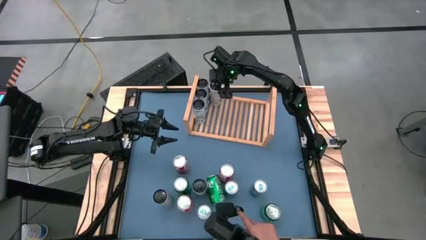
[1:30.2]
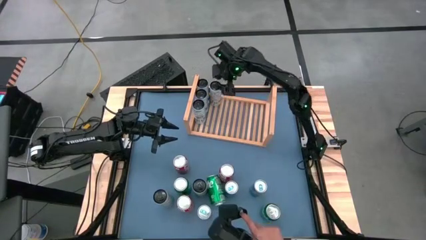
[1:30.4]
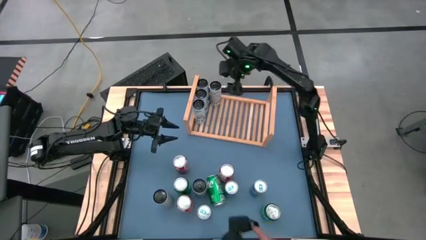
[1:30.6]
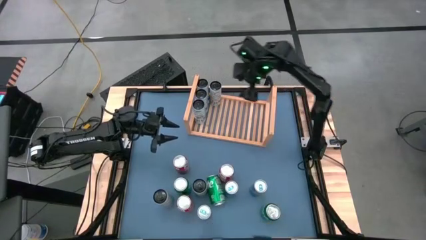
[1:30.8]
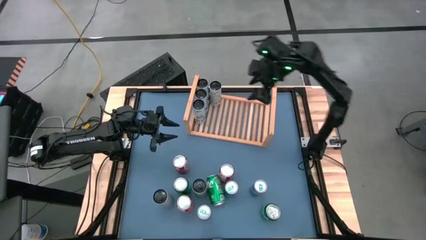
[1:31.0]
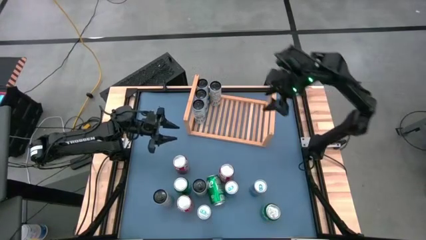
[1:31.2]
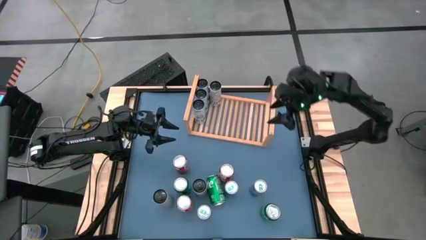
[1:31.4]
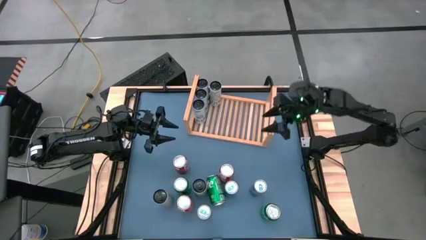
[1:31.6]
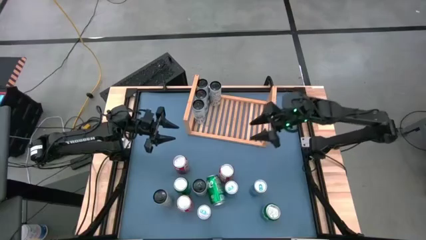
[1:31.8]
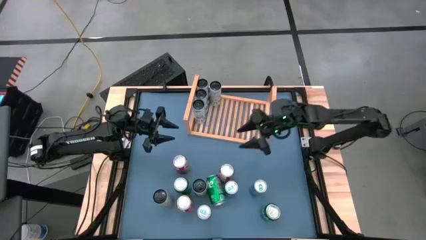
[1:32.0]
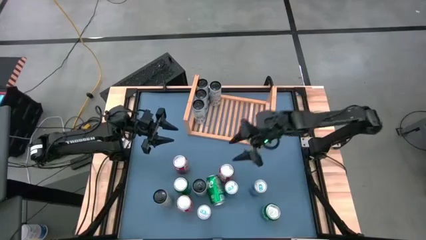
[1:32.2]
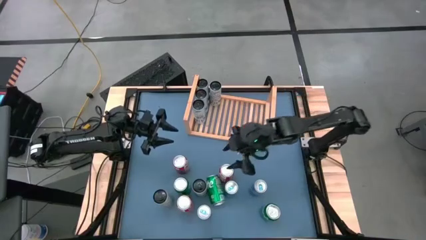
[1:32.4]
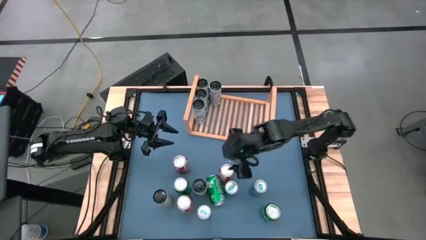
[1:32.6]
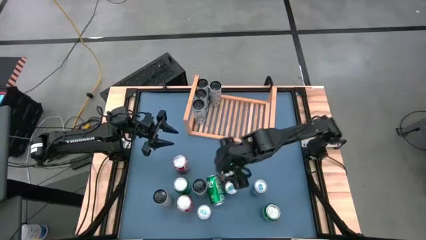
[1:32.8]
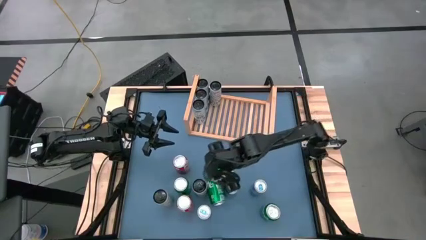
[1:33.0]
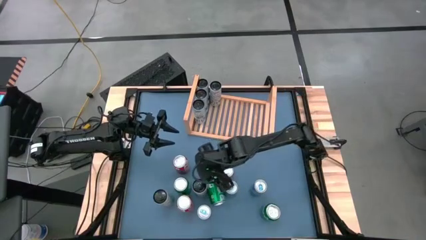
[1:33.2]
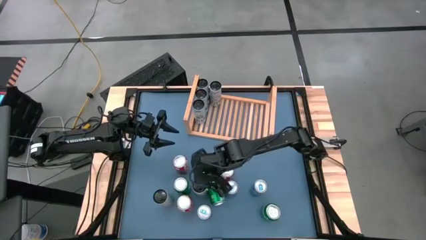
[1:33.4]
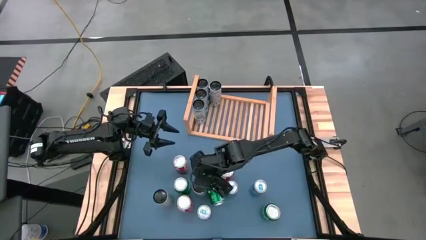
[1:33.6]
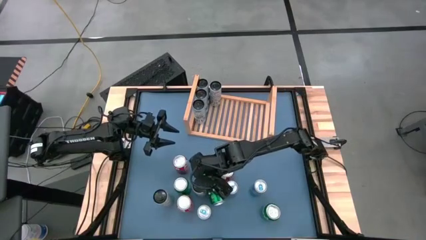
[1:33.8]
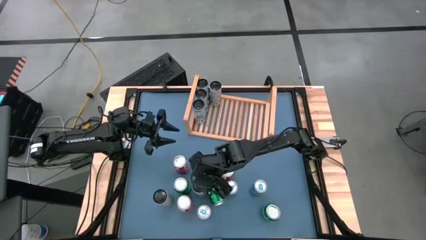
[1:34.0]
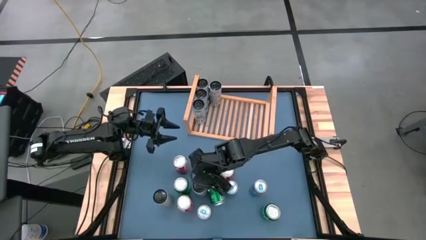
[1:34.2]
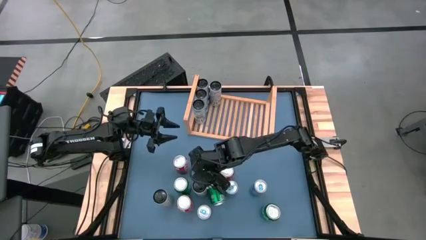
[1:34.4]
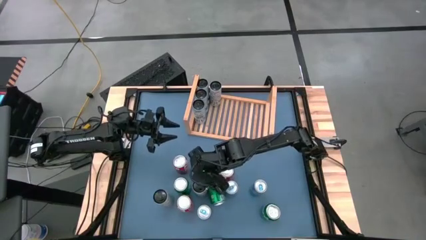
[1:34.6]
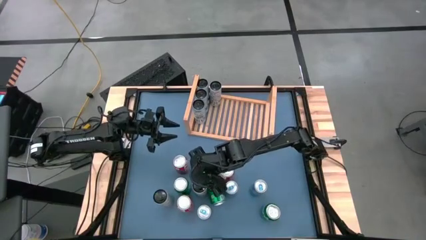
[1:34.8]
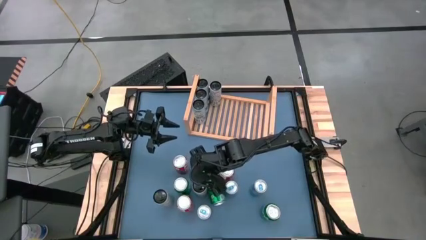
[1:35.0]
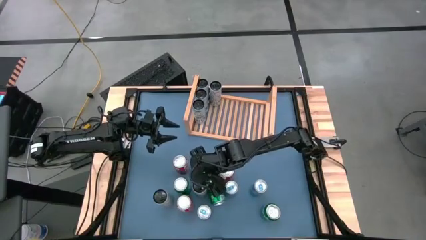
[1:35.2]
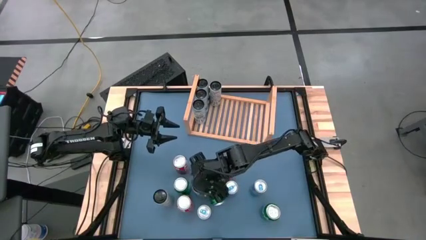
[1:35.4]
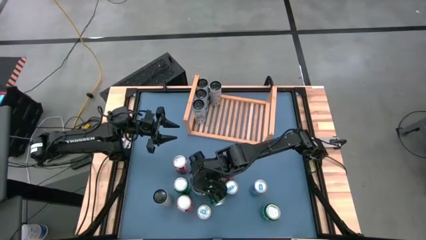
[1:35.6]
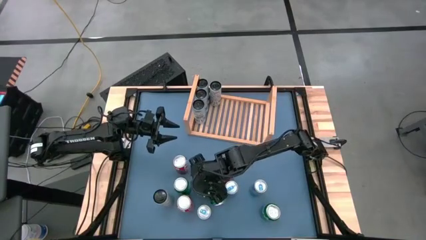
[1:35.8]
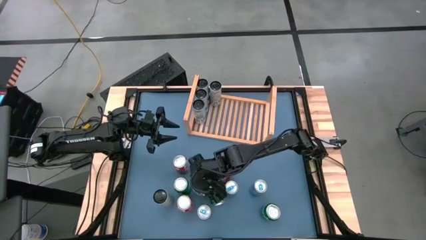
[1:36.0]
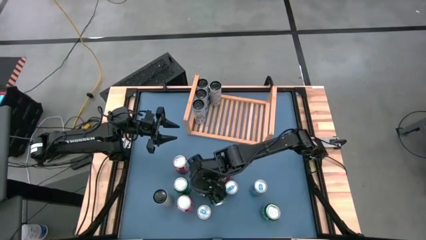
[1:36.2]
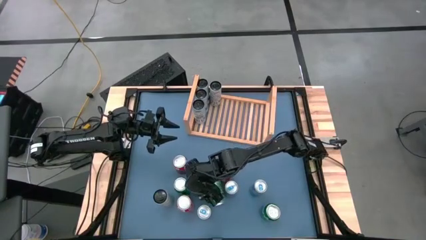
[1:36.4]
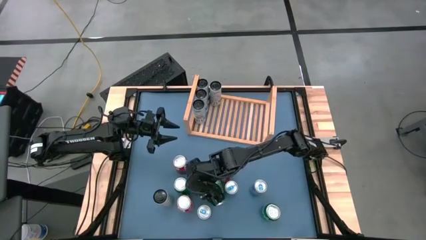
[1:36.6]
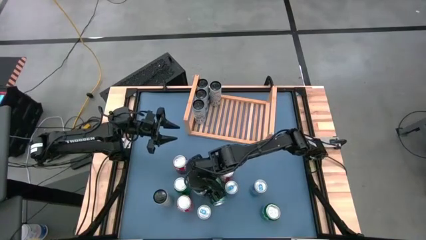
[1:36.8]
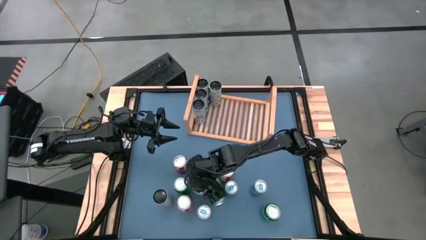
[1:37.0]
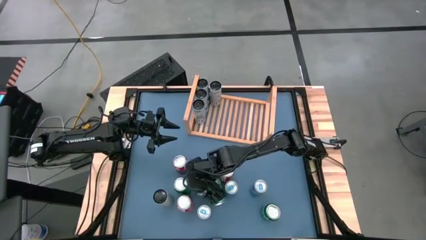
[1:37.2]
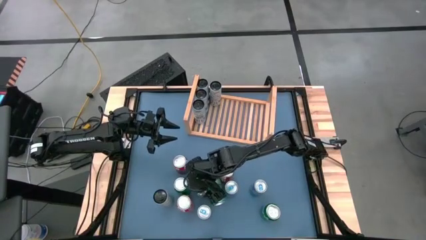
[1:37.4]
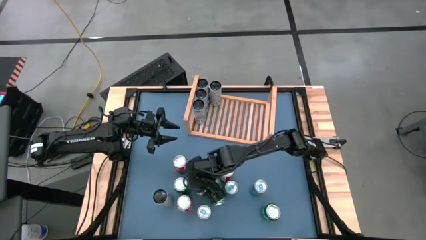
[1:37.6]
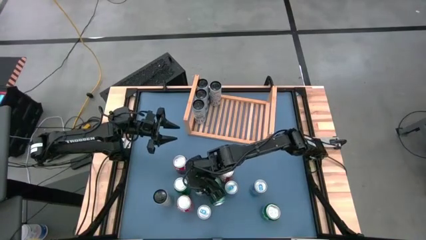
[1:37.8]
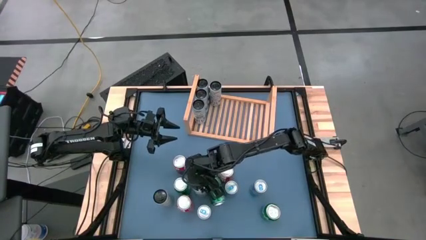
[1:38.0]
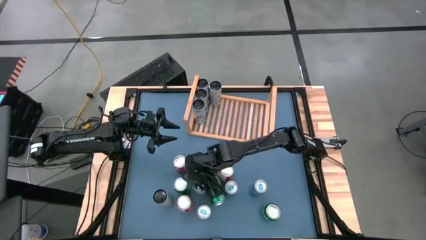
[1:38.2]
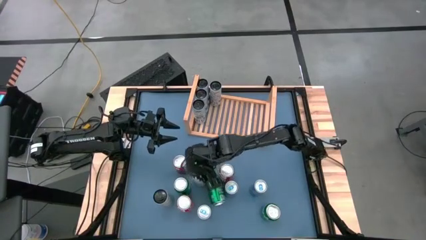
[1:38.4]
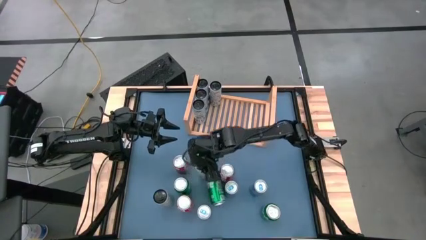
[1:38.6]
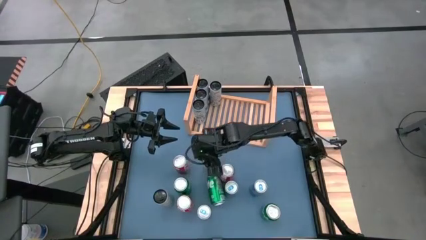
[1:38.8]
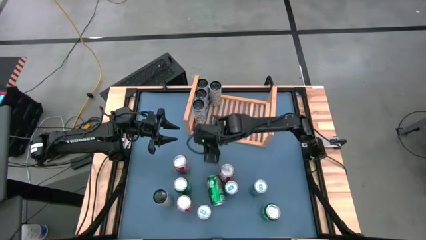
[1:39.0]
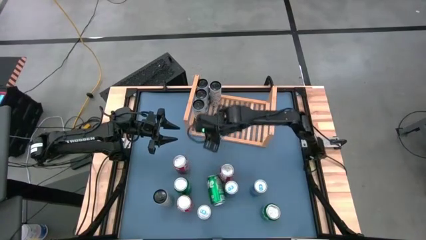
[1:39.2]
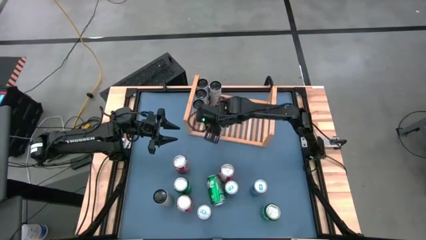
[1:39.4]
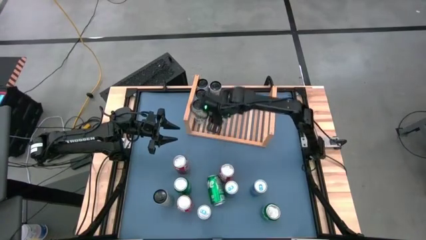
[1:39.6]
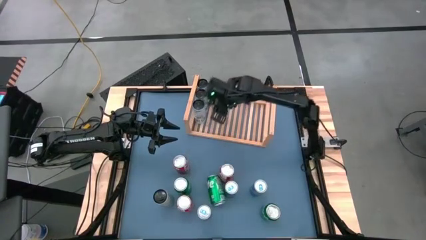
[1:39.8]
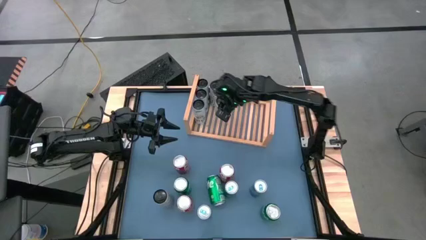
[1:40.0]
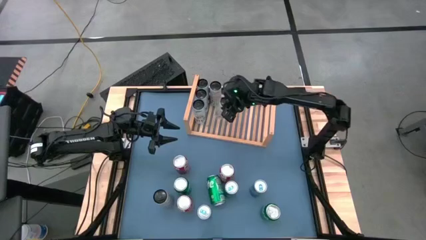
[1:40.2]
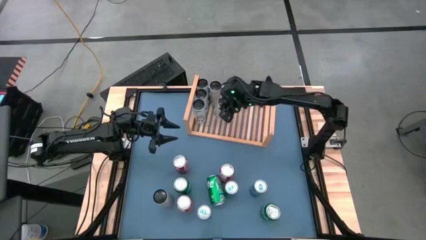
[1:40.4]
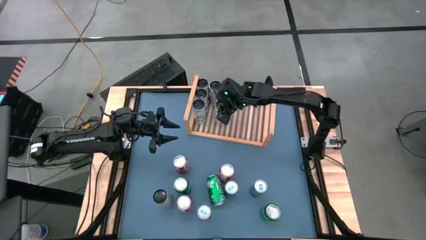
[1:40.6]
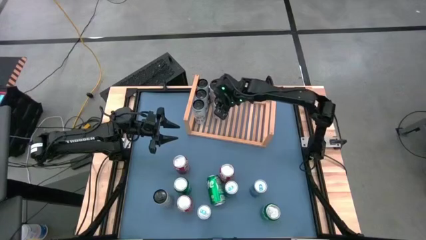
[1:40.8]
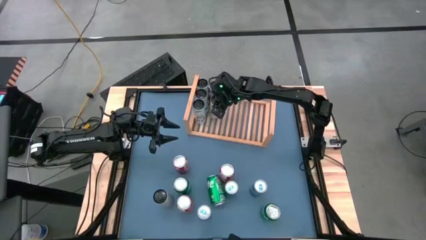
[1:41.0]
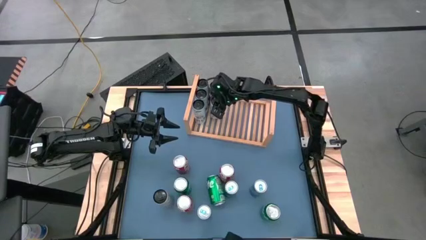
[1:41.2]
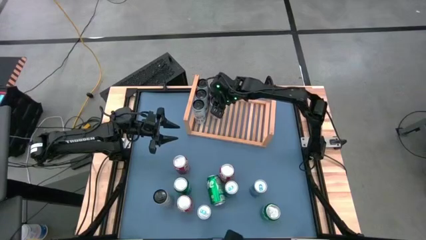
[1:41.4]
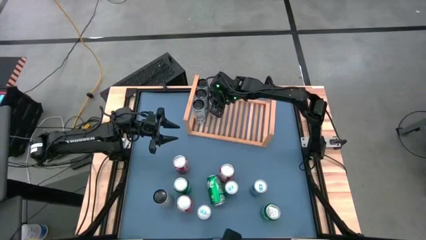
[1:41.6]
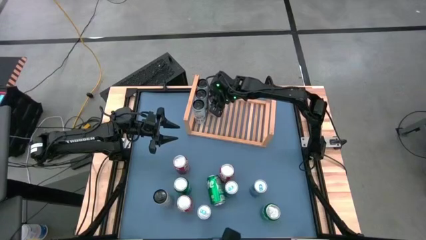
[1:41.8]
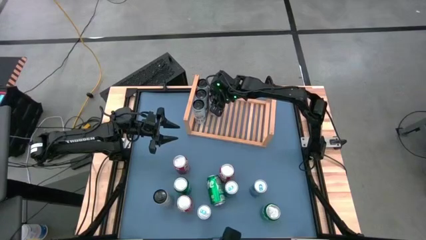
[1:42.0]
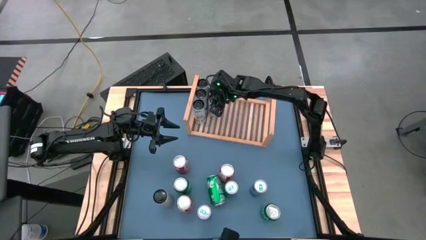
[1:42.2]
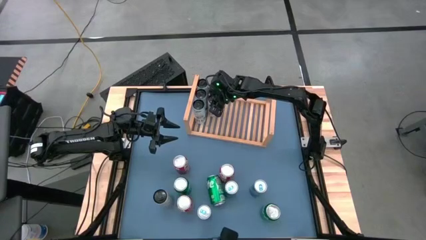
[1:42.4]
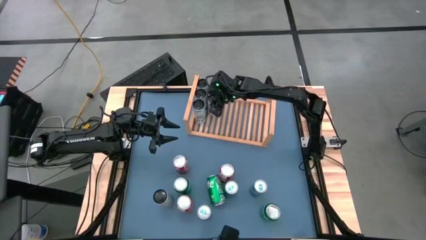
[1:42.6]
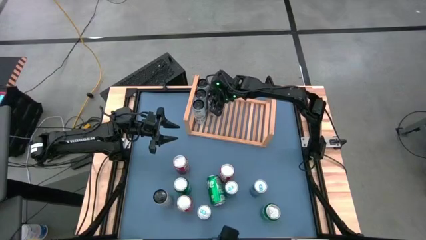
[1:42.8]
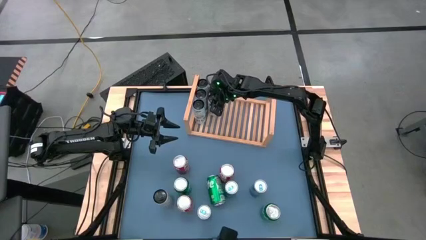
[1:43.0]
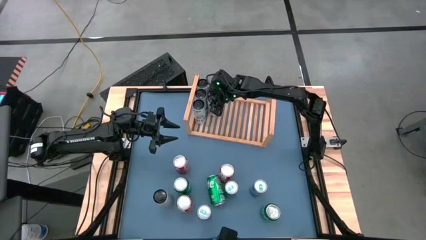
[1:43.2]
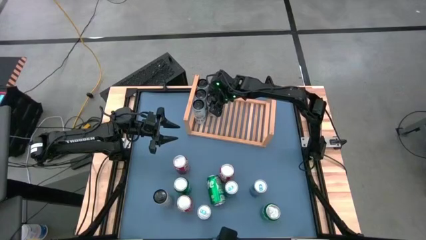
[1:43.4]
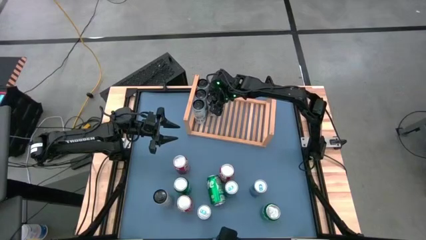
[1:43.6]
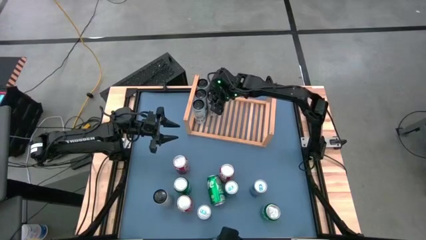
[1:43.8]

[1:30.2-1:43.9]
Task: Place canned beverage on shelf
Put the white yellow soda can on the shelf aligned with the other white yellow soda can

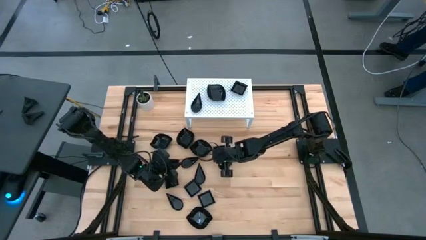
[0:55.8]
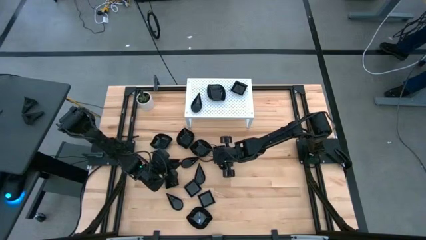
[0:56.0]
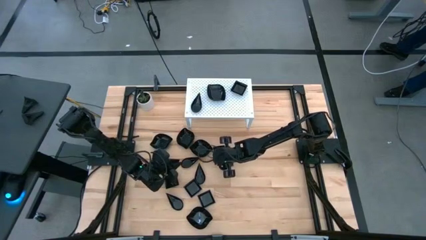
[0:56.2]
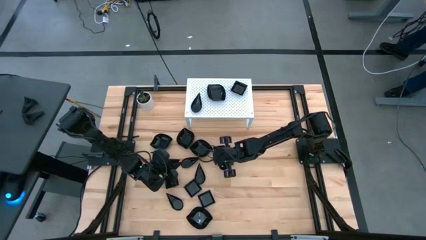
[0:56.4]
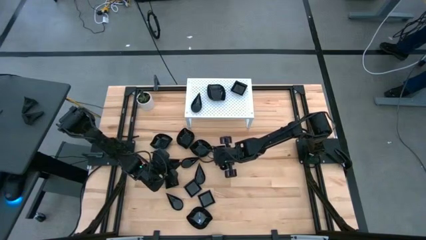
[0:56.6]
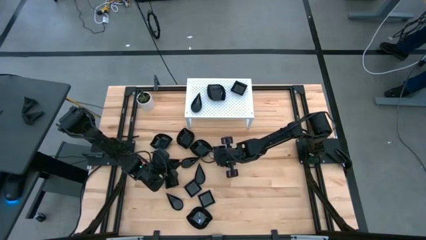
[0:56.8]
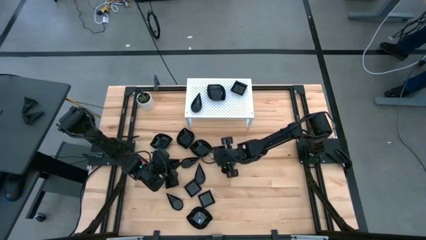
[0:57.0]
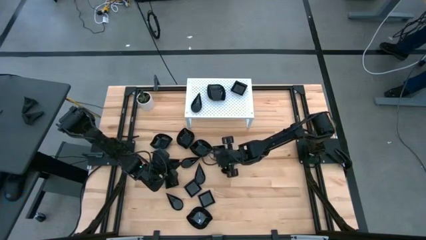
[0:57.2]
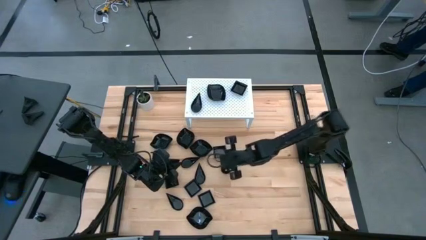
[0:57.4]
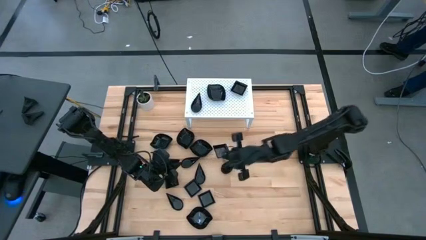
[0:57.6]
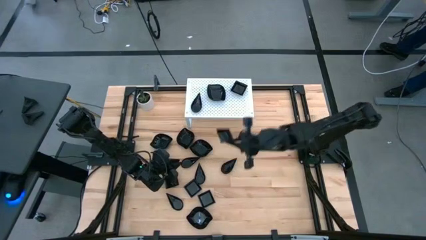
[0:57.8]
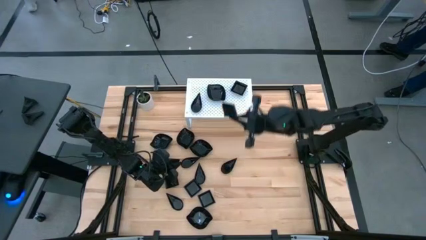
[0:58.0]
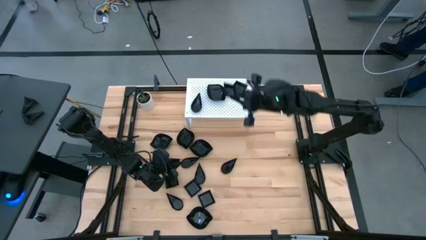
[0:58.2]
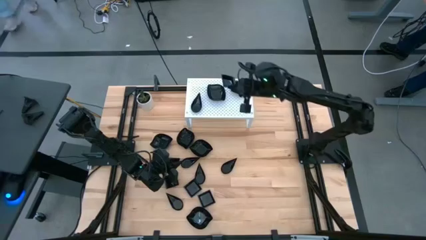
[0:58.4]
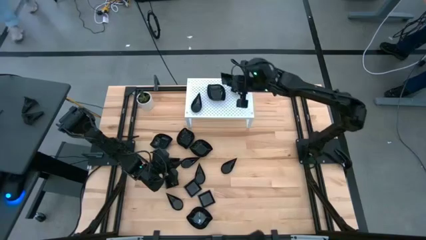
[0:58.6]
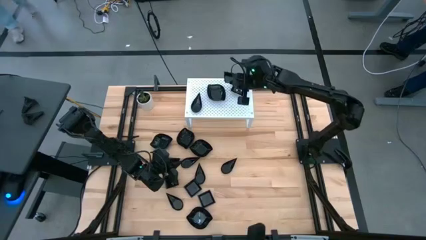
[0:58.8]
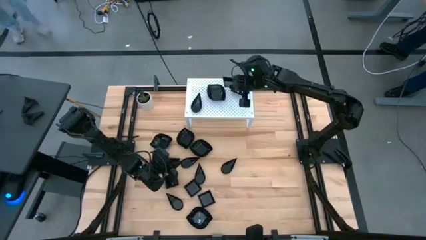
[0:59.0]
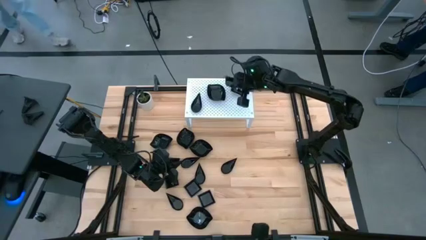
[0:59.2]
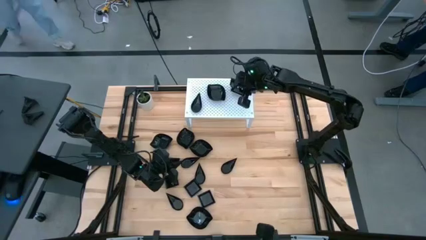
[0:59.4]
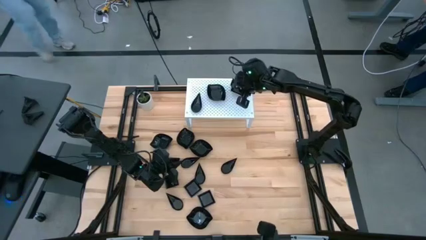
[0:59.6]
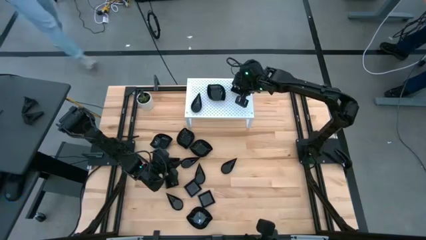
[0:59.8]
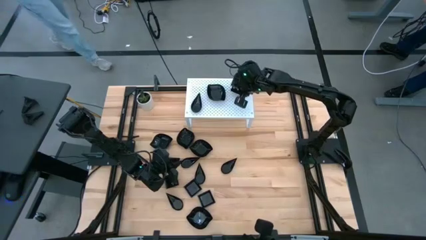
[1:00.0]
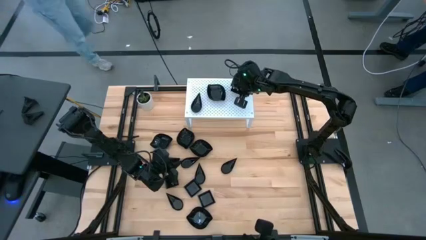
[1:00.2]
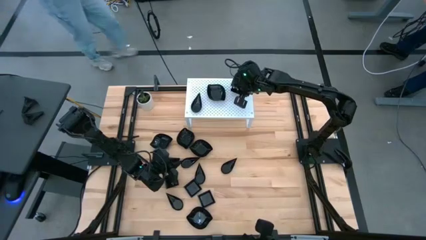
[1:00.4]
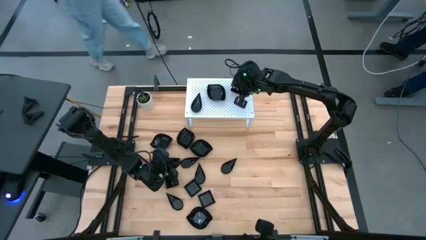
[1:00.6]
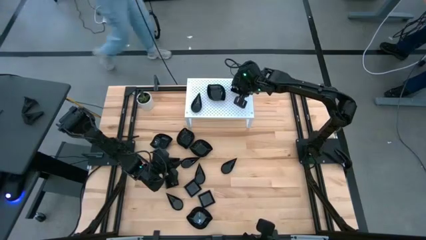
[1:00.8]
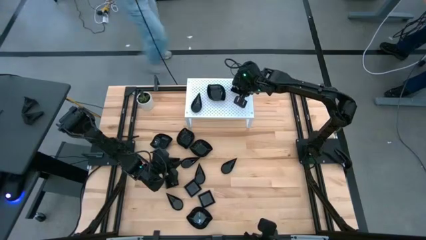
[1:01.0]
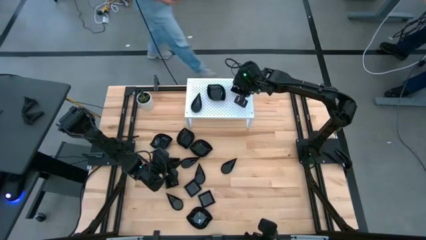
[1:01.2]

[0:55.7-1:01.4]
Task: Pick & Place Mini shaped plates
Stack the black square plate on top of the other black square plate on the shelf
